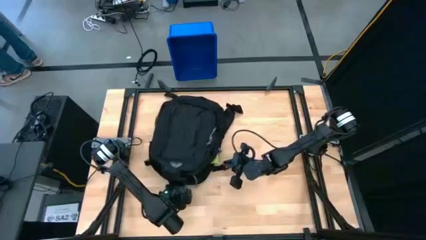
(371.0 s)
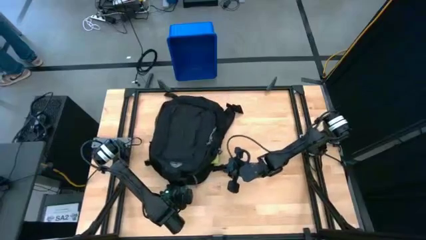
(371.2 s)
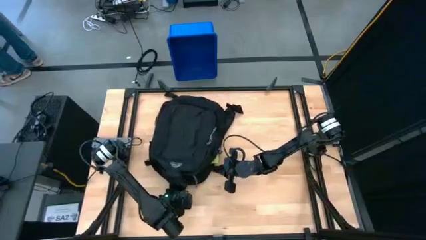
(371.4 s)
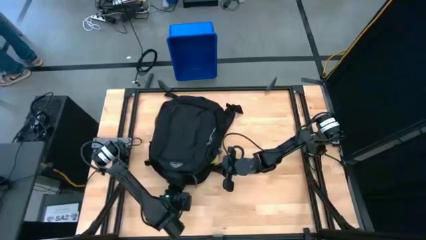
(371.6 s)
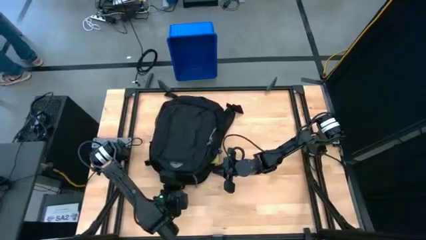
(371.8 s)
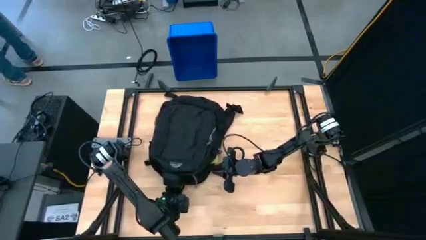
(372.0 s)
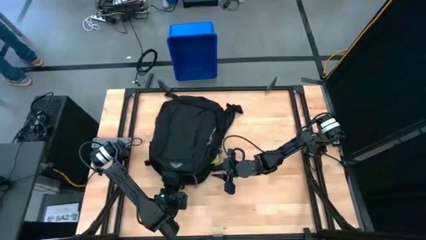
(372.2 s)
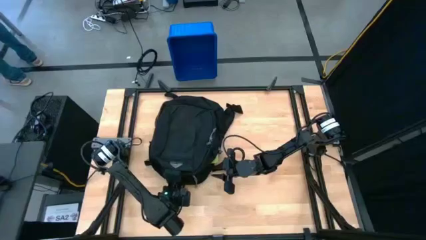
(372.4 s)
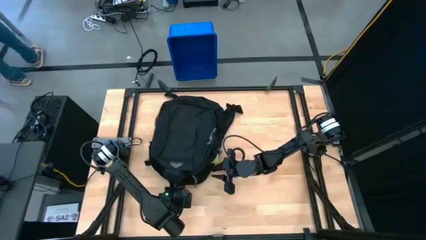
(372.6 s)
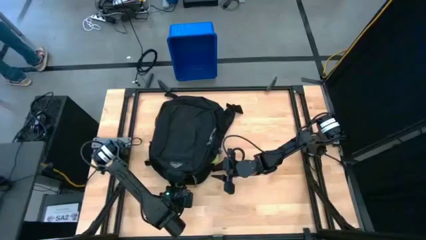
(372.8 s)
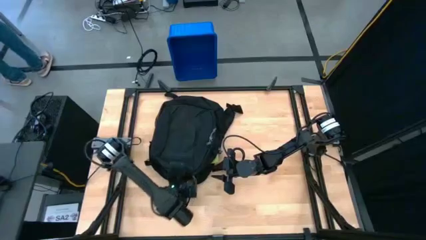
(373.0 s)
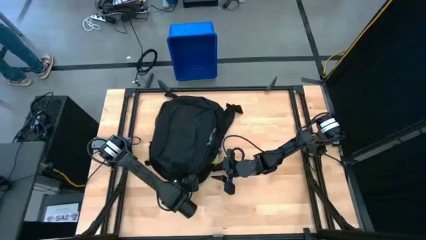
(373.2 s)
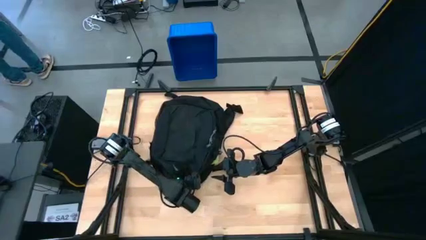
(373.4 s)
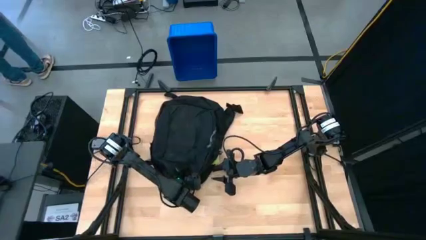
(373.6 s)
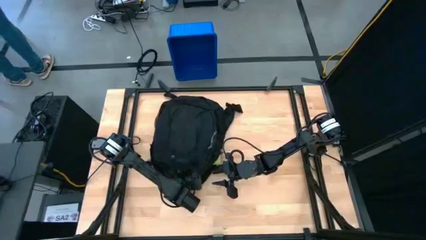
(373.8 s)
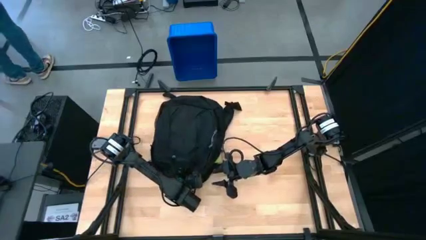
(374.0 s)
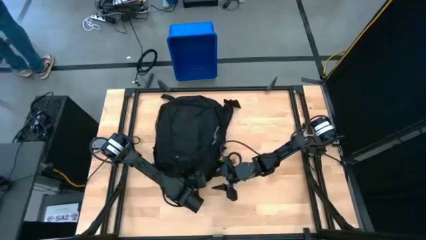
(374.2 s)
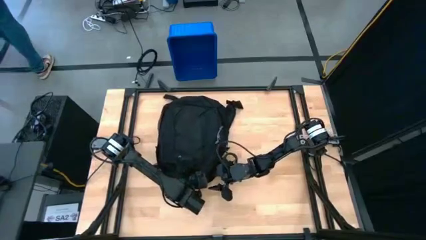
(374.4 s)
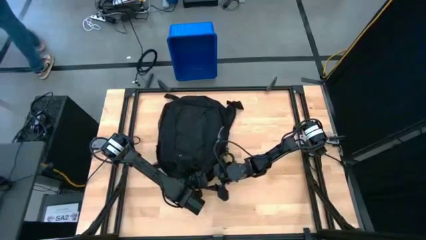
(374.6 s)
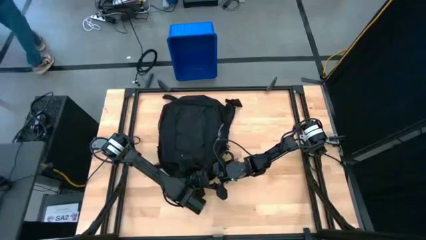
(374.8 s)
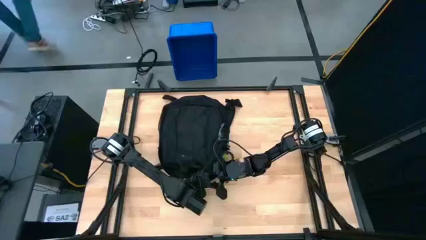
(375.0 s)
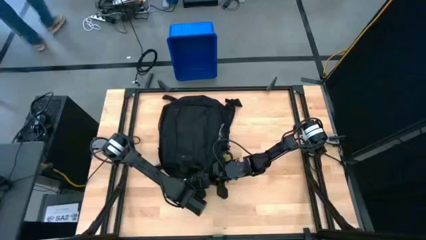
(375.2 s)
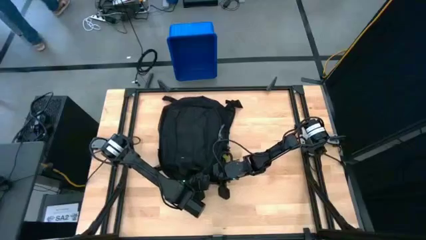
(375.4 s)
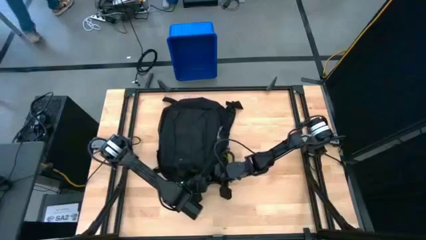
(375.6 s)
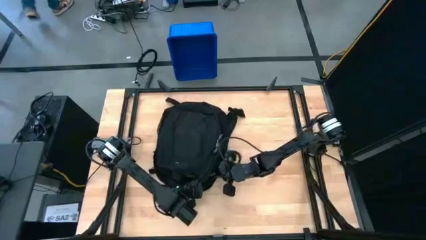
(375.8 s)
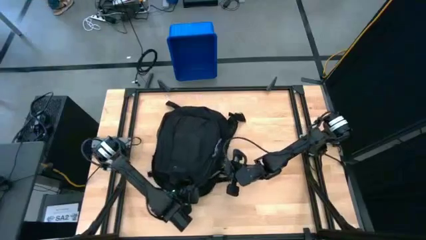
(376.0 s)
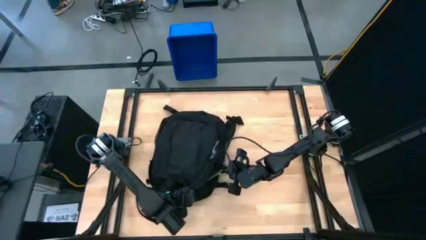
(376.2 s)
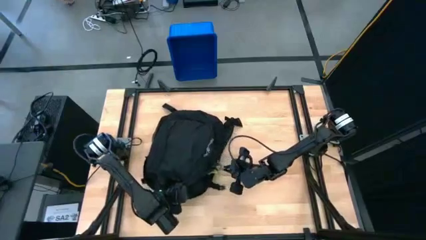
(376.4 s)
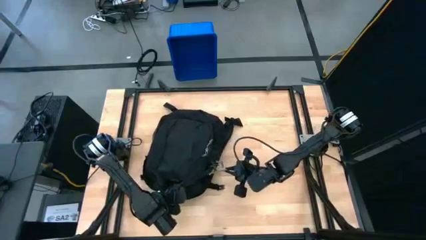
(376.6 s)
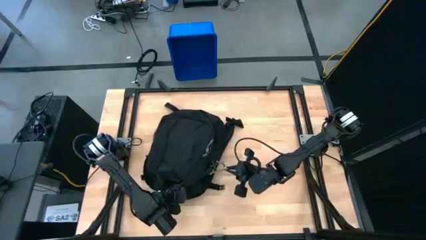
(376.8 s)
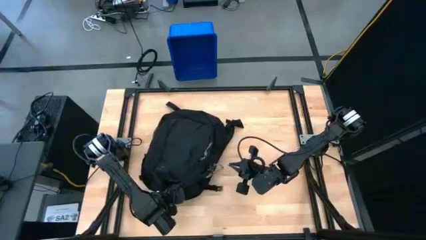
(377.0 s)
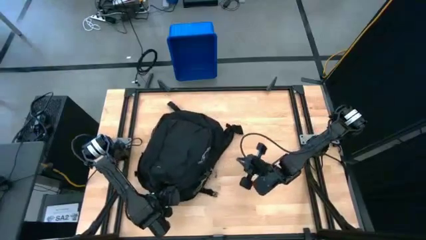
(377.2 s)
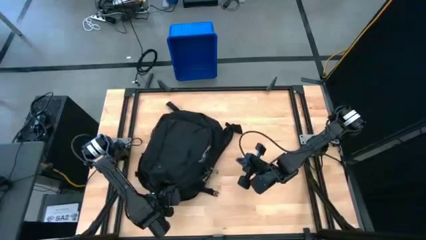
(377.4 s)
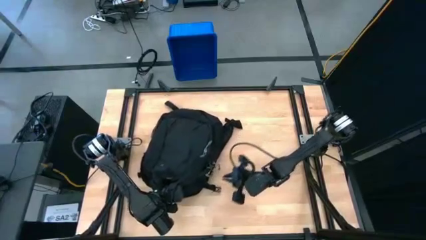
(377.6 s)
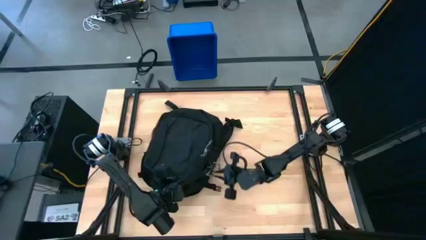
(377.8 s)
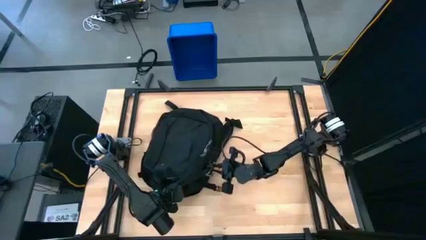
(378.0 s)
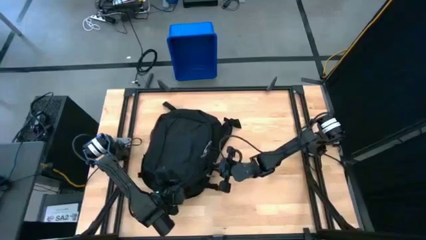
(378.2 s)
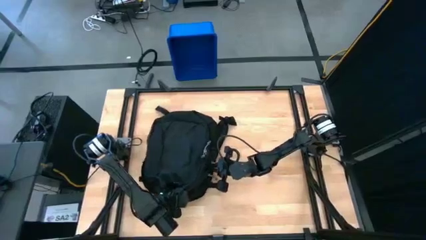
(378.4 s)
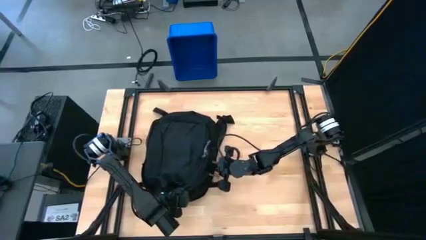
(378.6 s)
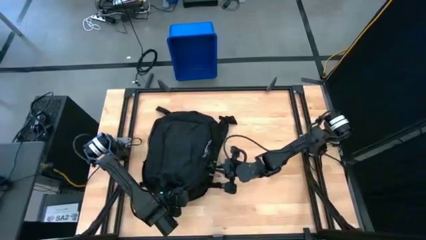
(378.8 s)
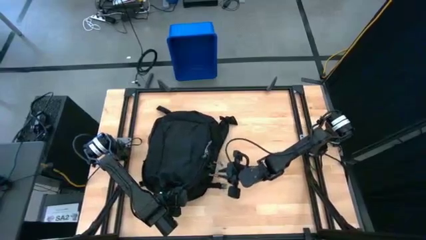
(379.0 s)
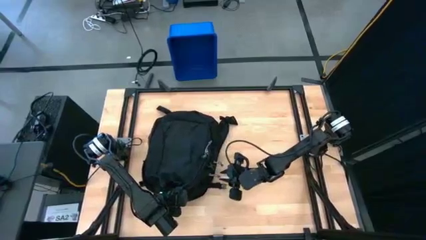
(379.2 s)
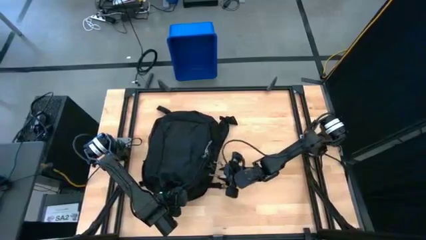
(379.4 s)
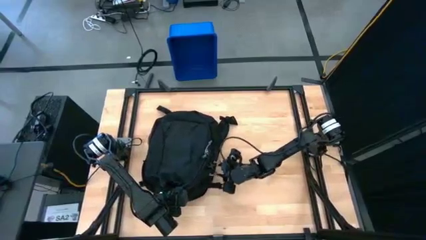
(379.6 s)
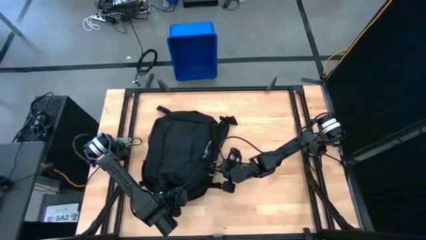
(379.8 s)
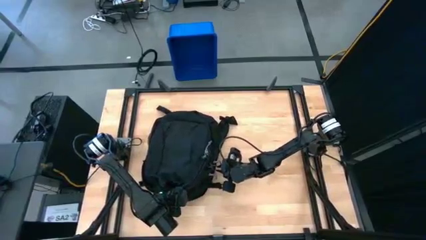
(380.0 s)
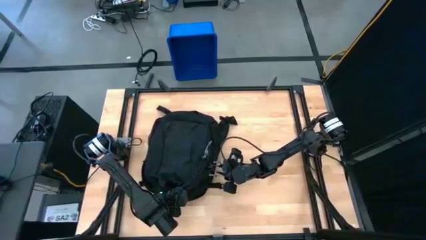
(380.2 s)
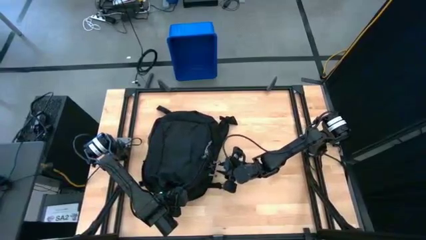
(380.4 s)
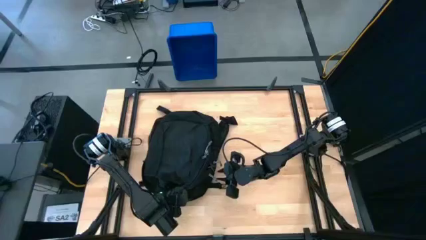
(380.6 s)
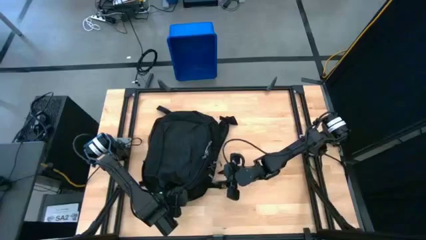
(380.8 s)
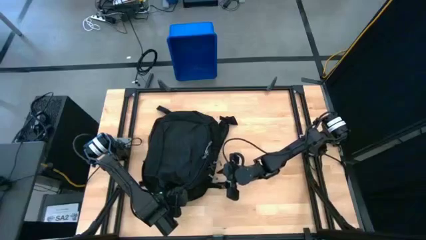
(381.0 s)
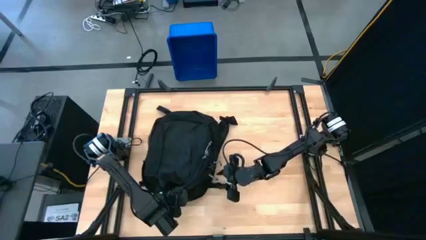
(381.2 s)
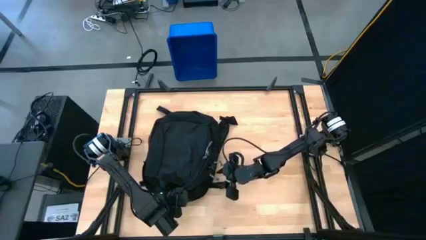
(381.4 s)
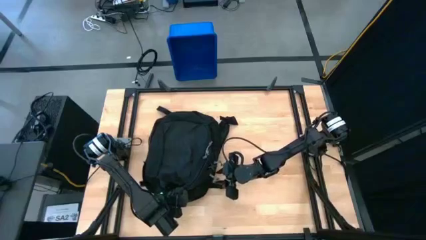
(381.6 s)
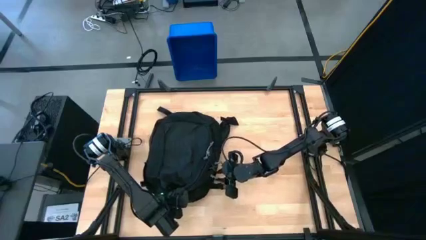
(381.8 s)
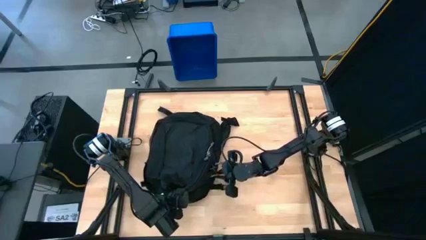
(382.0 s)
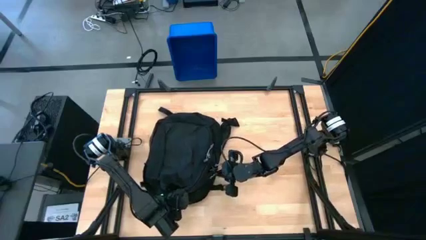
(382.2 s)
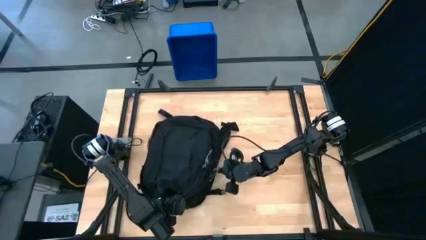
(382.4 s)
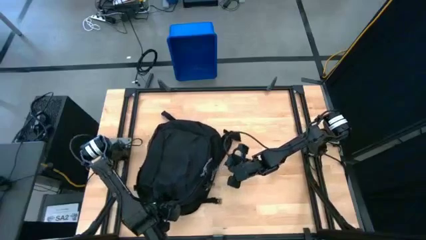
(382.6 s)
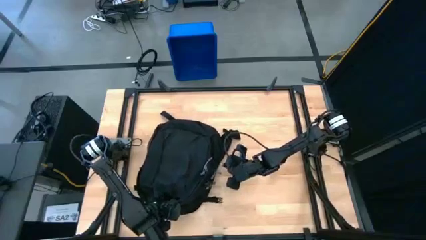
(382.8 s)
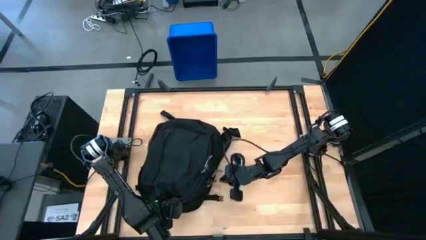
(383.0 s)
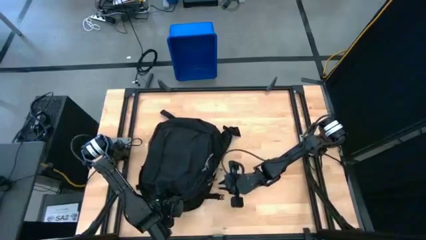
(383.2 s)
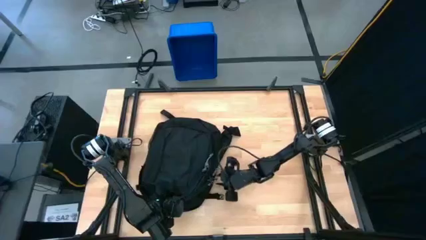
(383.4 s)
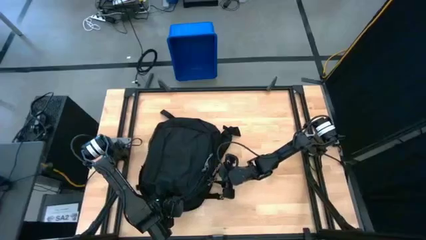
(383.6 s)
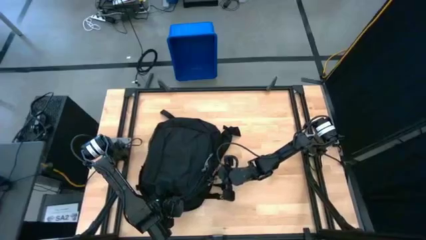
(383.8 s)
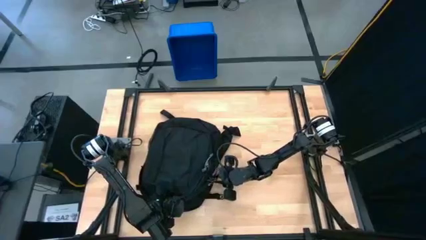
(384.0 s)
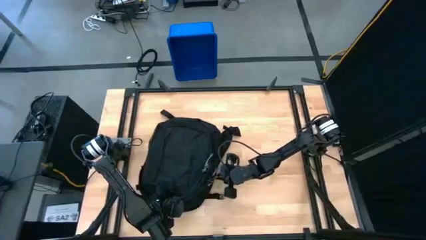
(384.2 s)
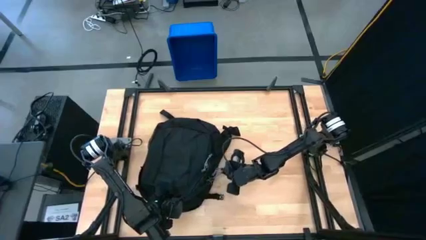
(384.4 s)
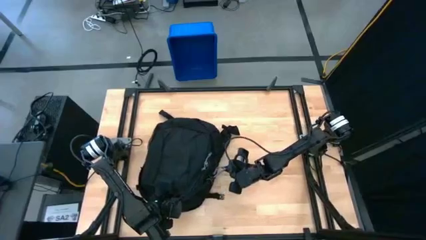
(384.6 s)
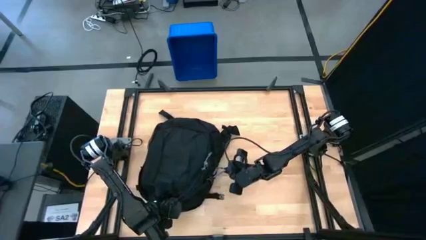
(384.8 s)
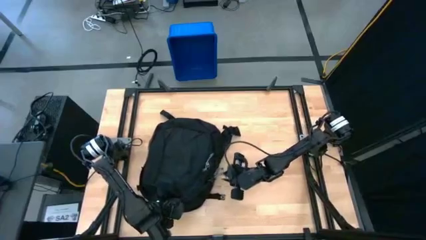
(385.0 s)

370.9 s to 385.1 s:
Task: Unpack backpack
Close the backpack

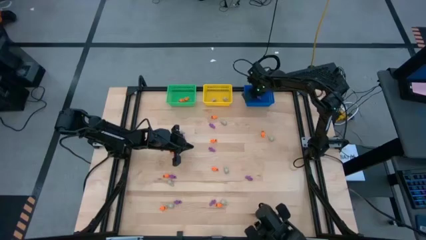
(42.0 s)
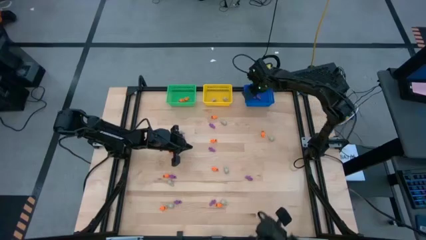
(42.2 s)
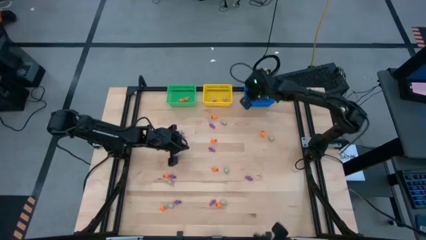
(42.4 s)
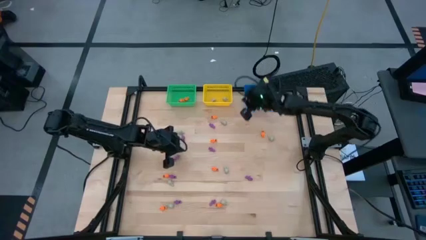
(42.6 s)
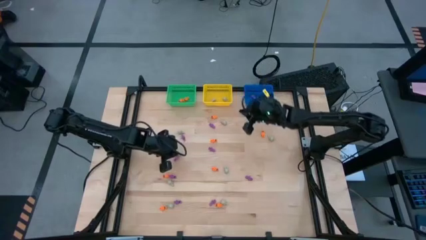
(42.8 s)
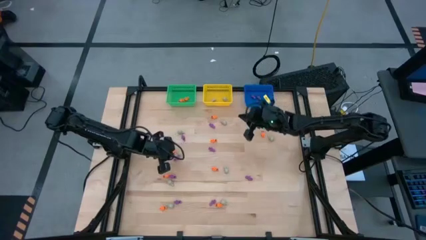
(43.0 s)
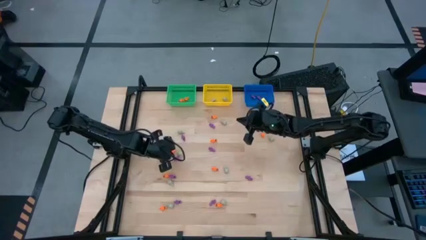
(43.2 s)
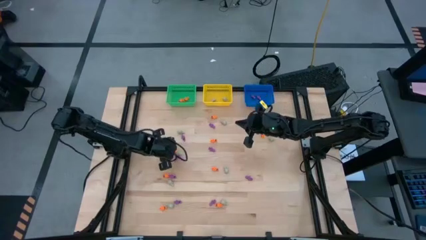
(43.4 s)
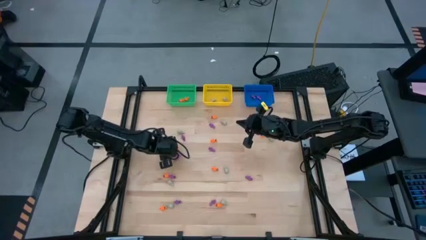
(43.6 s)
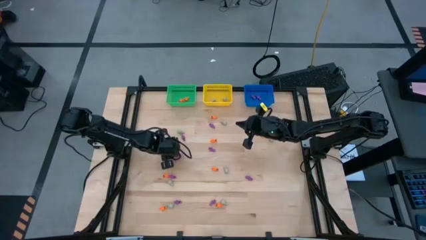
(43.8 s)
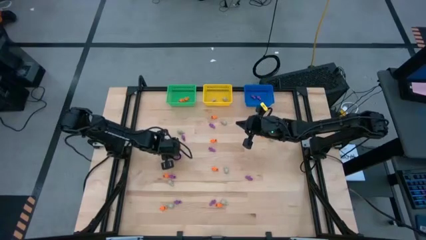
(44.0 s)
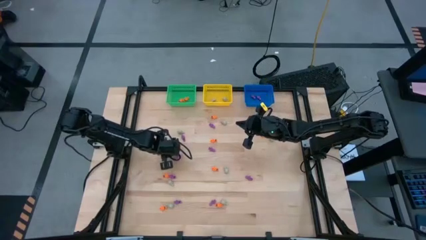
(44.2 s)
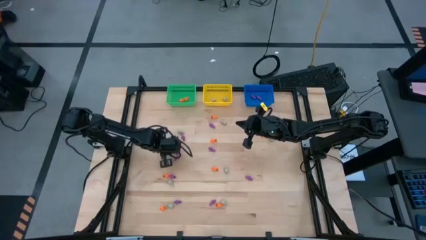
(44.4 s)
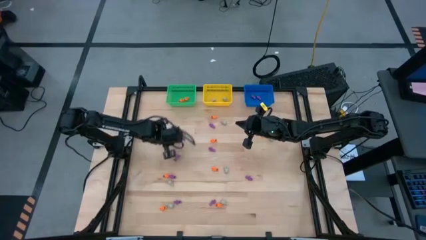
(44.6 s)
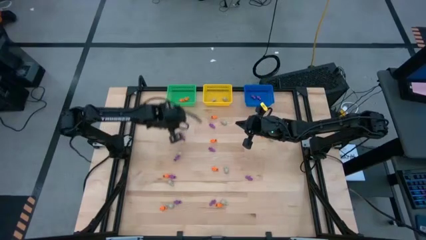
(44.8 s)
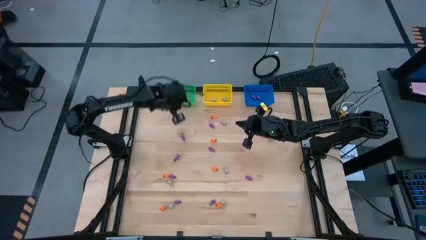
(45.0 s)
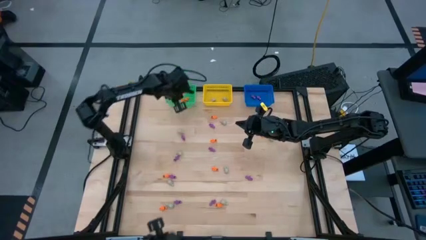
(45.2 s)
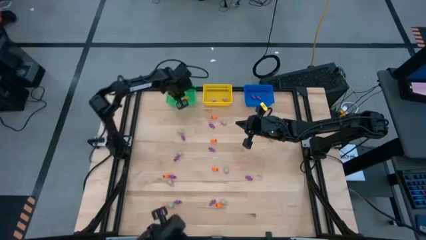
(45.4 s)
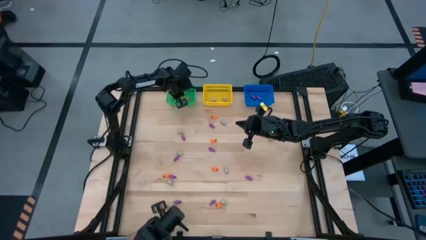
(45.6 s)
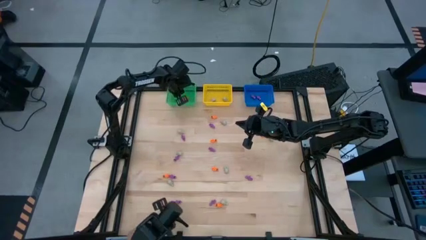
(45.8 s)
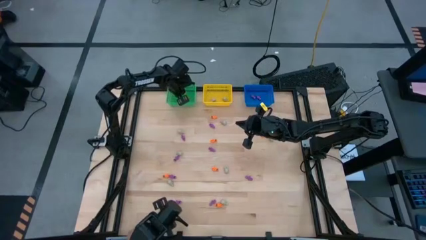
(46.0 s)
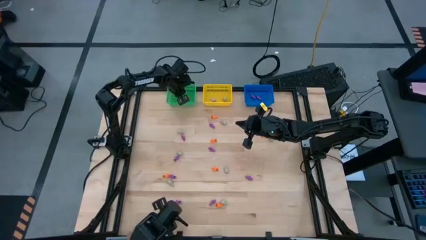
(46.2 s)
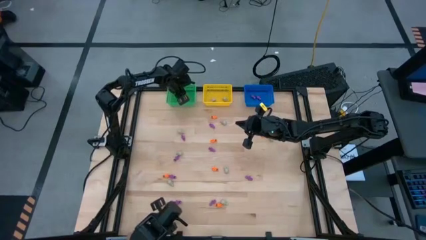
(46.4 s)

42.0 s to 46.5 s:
Task: Sort Halloween decoration
Put the orange skeleton toy into the green bin
